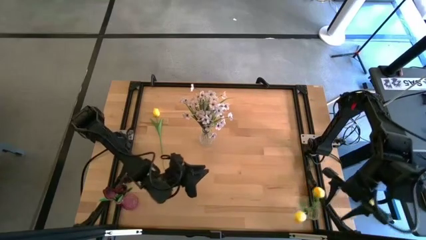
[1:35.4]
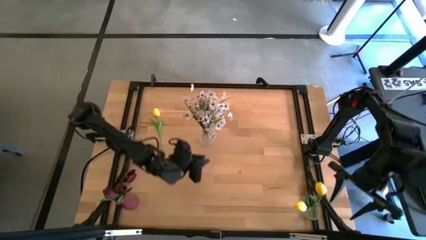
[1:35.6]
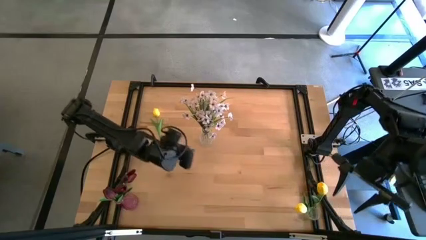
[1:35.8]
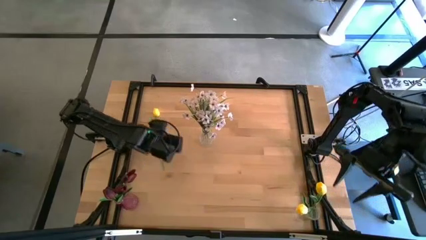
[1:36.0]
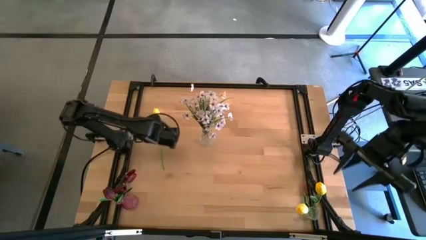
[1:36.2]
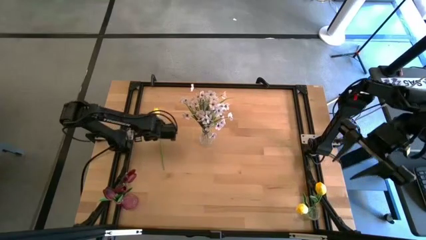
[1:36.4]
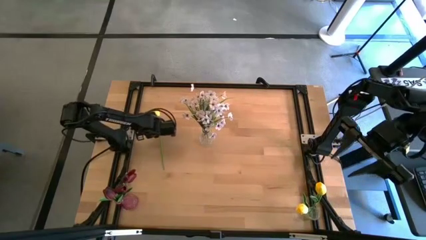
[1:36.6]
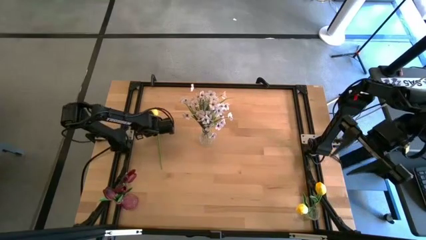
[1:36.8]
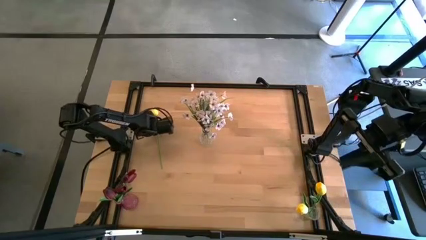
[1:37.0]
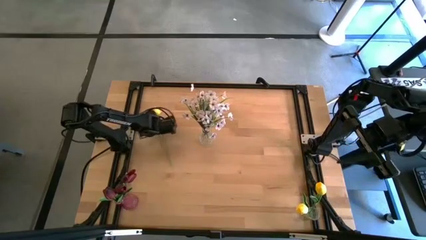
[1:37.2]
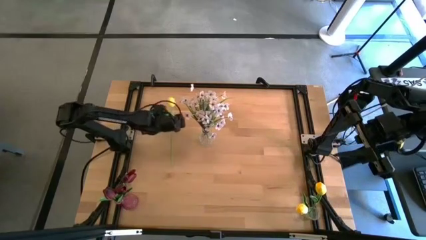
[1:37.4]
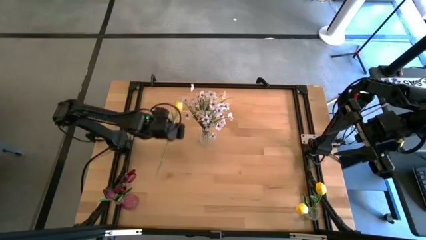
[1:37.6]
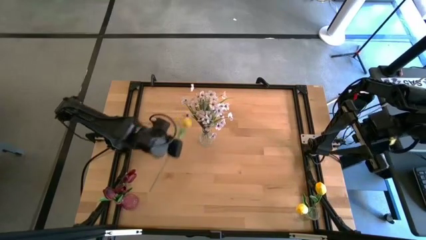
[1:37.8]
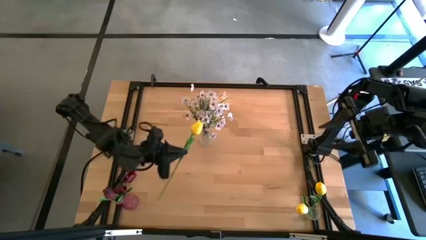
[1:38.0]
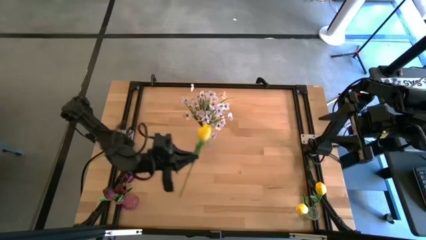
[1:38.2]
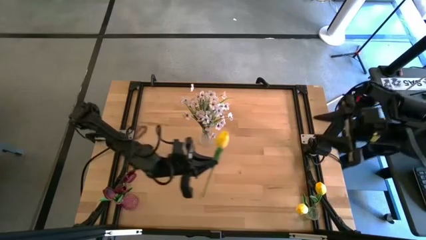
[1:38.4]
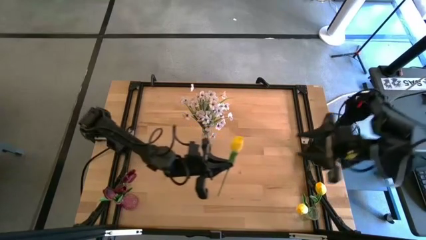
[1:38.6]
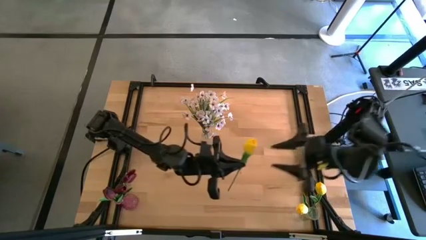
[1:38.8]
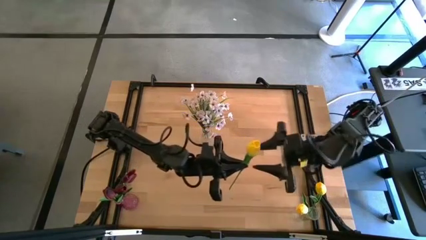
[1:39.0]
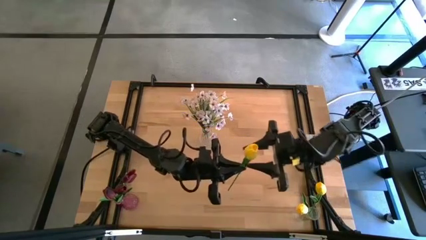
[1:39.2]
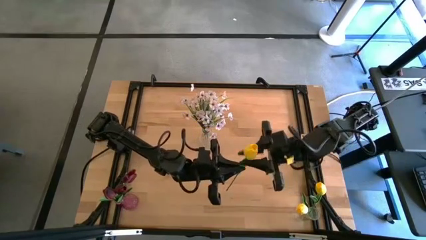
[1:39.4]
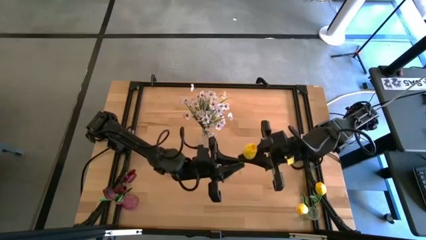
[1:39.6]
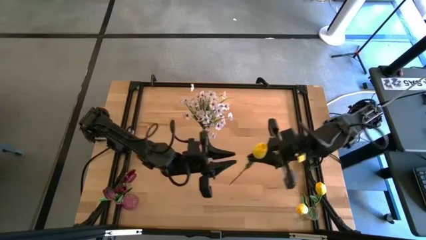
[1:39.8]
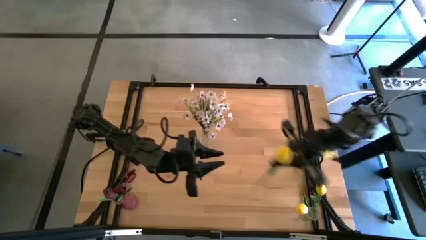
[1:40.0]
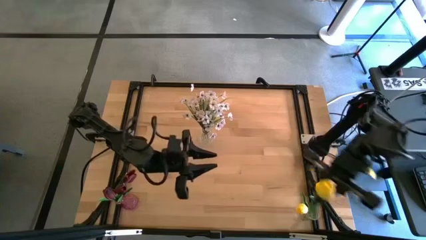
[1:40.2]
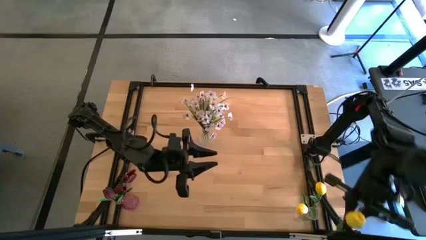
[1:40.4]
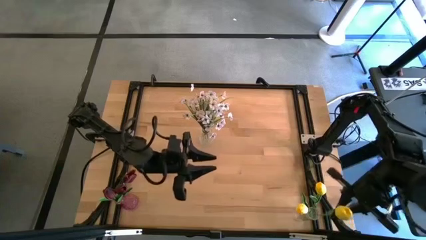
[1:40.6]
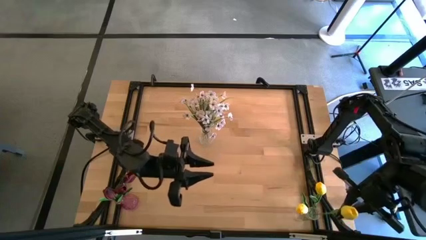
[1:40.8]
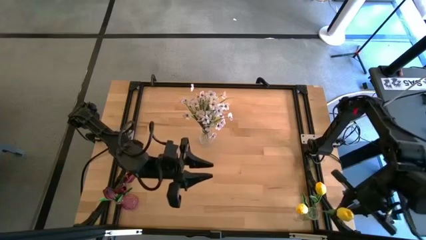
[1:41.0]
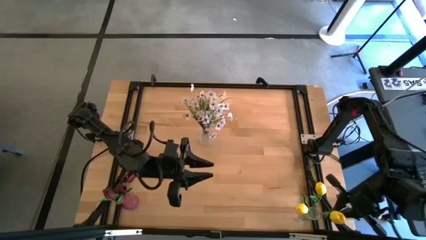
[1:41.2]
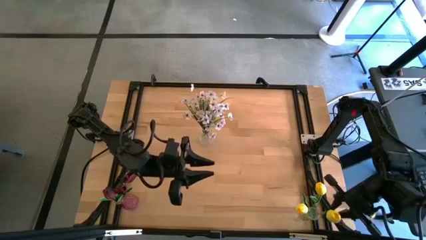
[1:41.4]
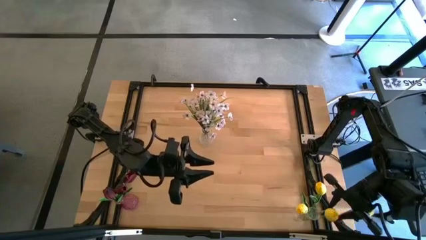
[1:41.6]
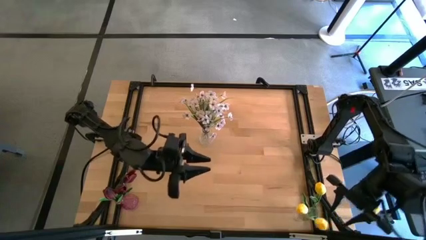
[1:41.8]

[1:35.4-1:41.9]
Task: Sort flowers into vase by color
Put the yellow tulip into the bottom transparent vase

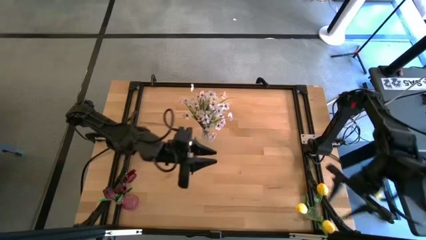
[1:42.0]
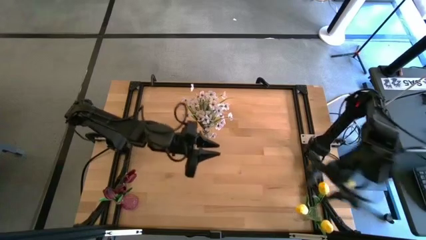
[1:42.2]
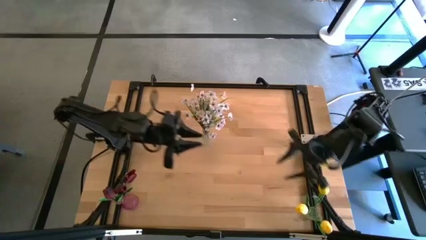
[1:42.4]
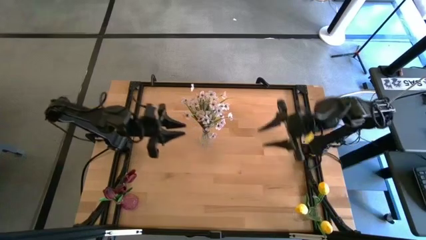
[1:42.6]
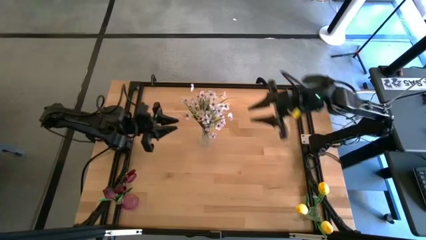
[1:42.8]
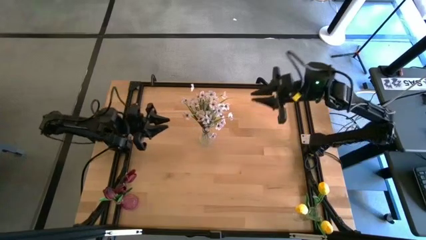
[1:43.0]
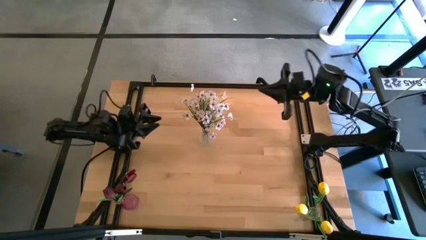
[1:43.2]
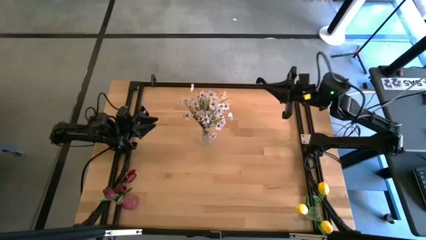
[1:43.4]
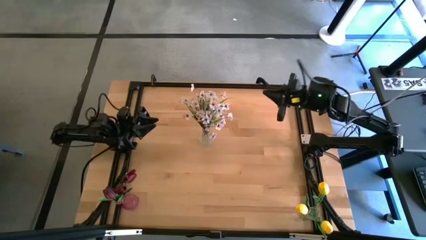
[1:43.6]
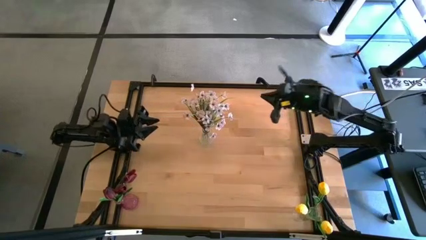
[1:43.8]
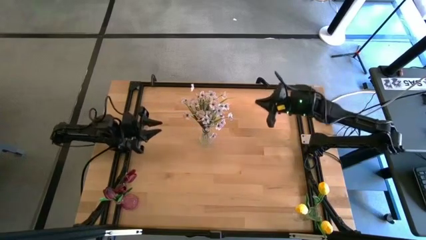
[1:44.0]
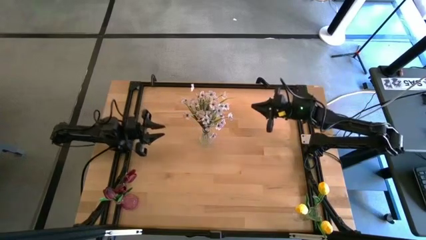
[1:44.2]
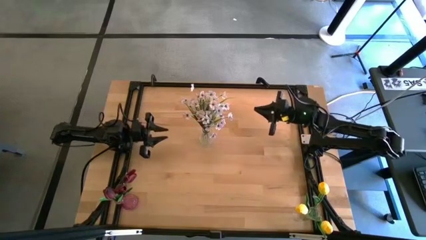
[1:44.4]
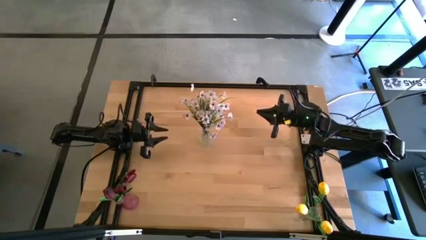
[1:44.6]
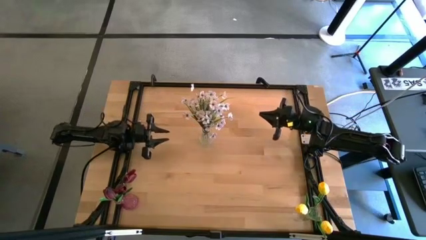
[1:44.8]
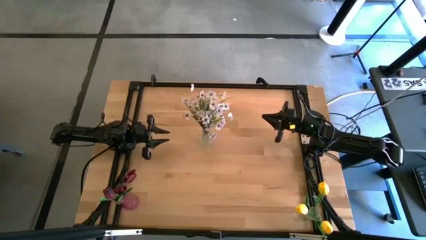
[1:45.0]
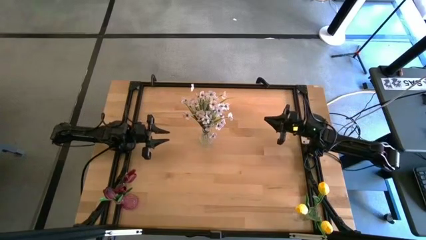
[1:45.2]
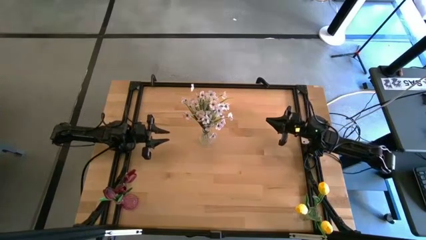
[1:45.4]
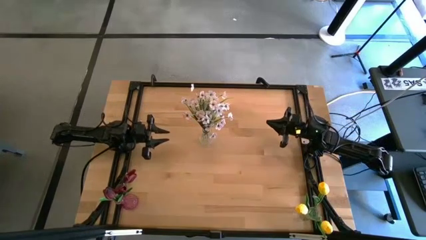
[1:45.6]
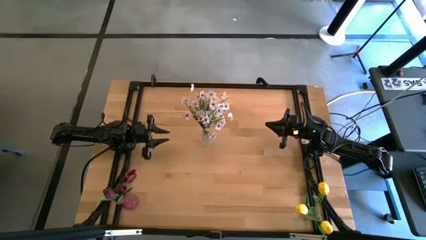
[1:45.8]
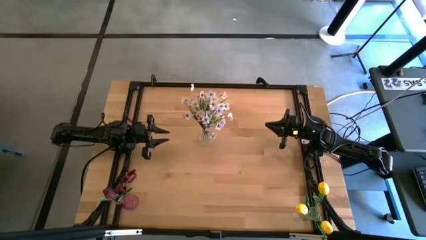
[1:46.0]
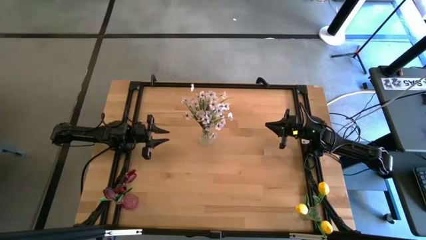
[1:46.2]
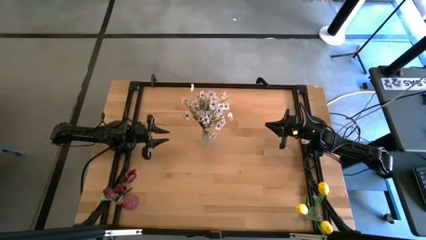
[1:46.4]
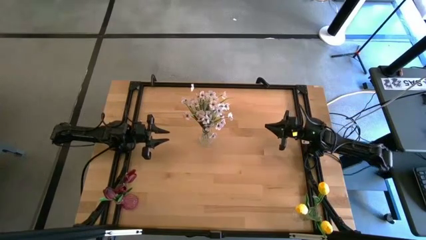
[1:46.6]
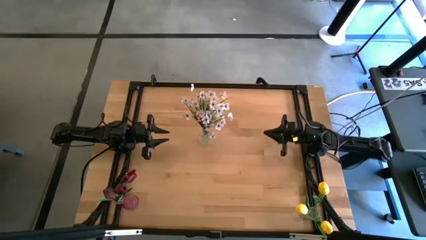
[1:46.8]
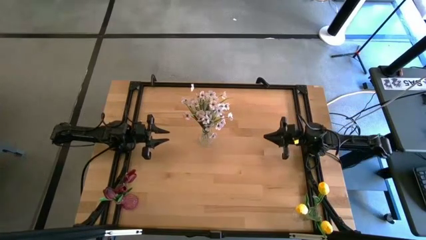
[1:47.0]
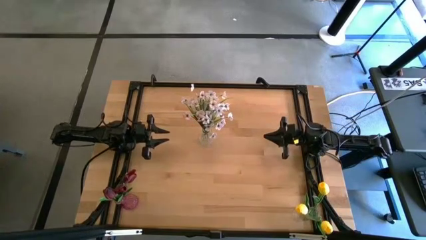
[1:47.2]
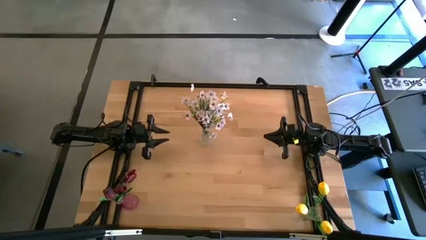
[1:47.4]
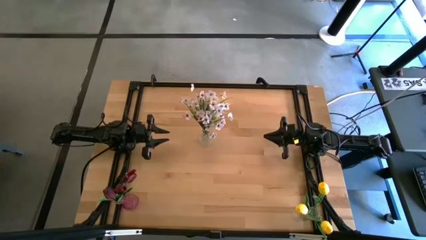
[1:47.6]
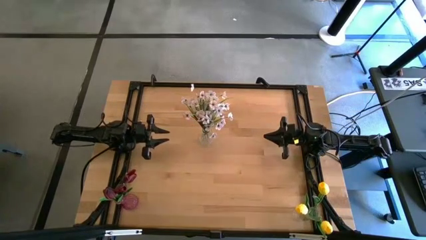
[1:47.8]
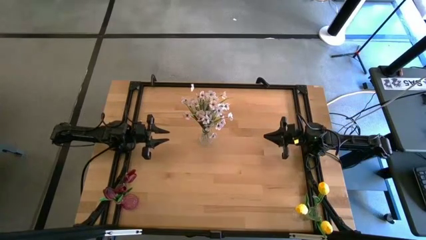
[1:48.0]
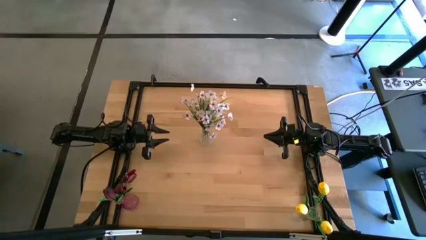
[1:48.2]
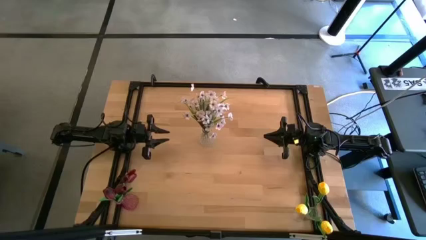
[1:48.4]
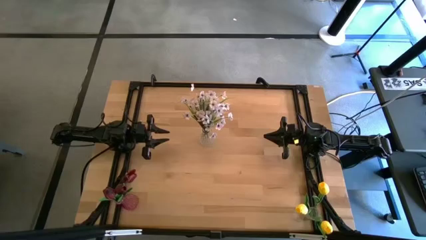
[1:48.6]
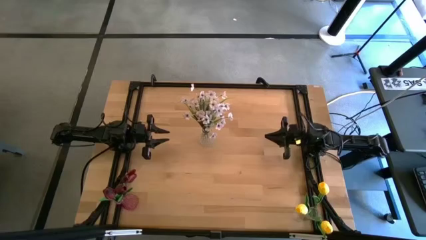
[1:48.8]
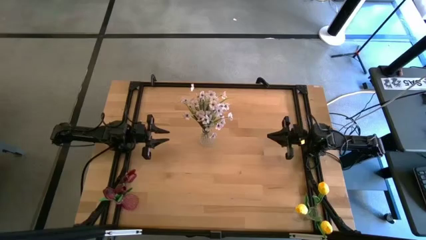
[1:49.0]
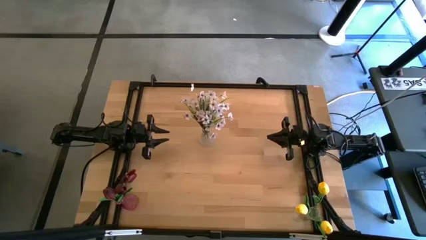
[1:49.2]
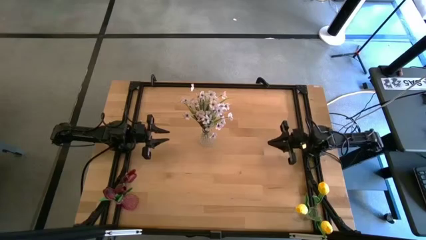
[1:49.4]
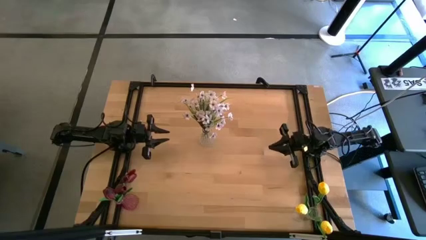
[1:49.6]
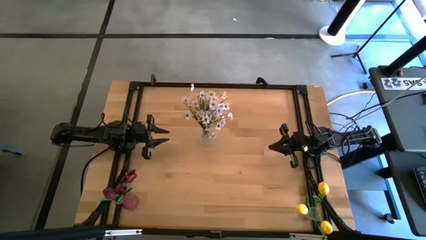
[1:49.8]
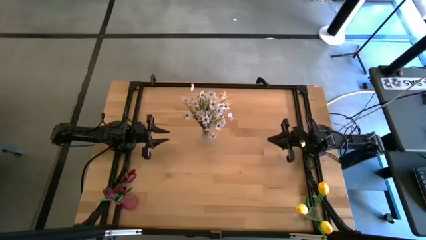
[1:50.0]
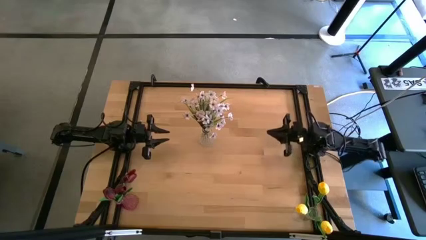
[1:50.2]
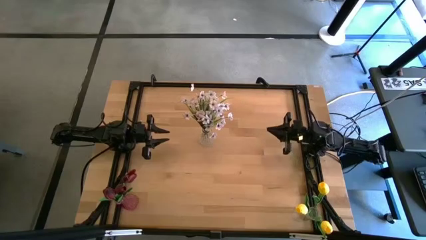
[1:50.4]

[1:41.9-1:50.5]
Return to Home Position
